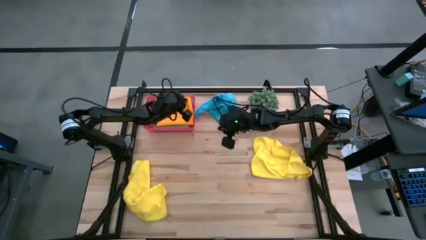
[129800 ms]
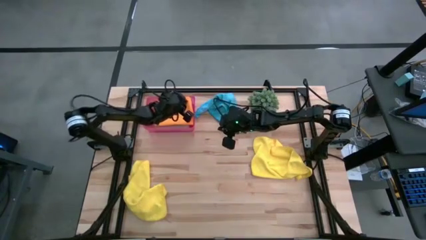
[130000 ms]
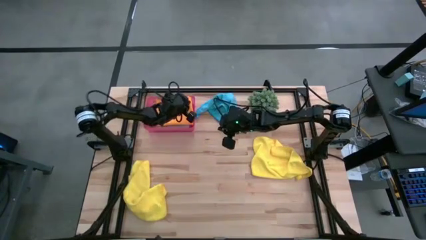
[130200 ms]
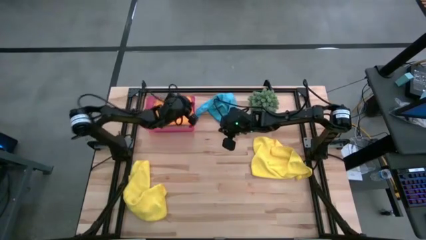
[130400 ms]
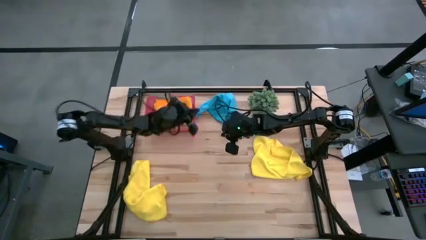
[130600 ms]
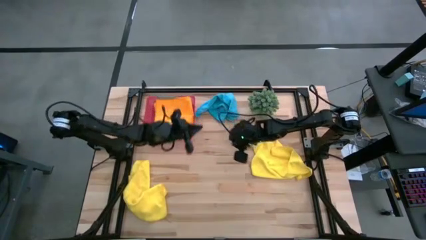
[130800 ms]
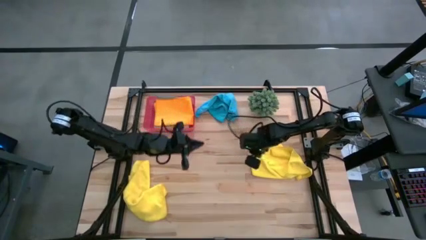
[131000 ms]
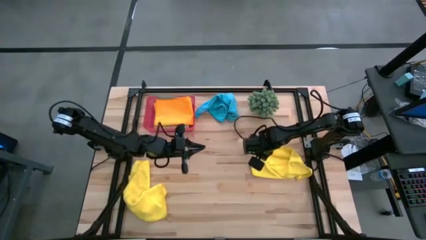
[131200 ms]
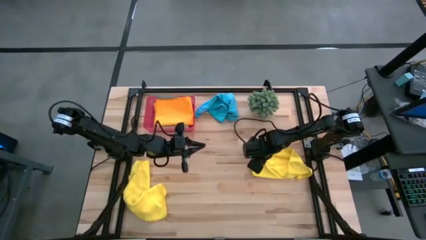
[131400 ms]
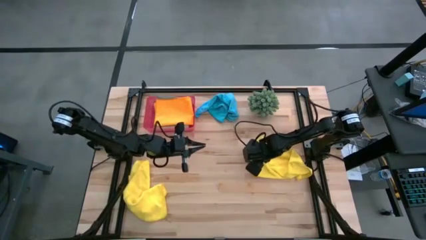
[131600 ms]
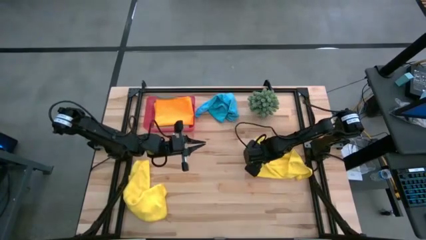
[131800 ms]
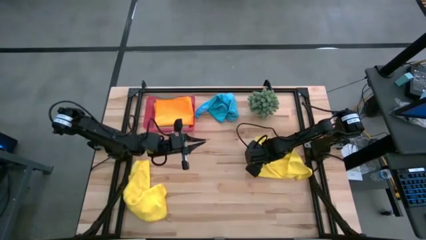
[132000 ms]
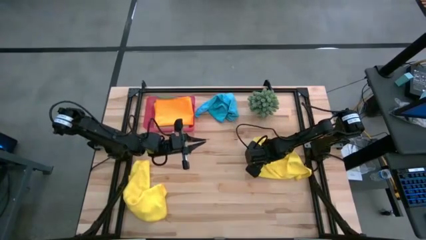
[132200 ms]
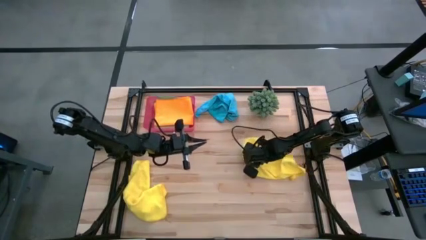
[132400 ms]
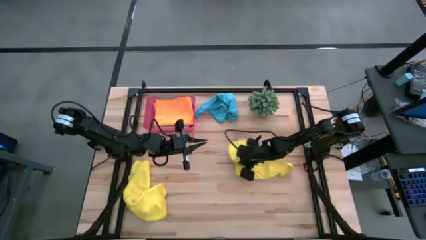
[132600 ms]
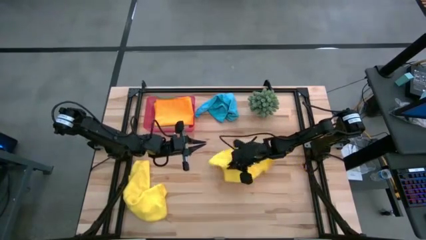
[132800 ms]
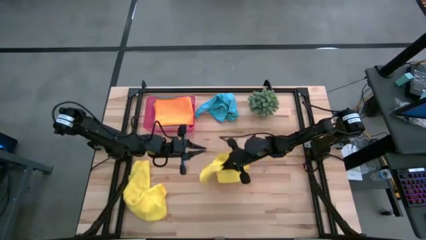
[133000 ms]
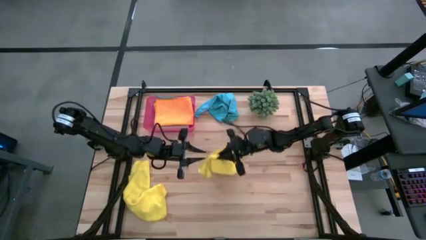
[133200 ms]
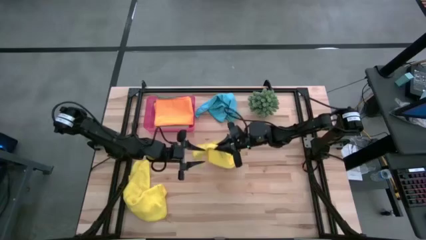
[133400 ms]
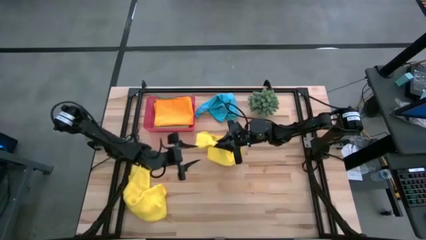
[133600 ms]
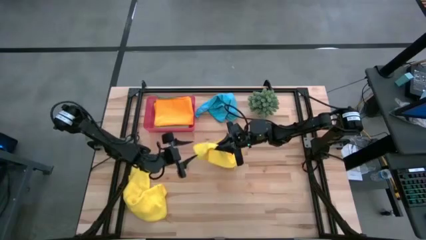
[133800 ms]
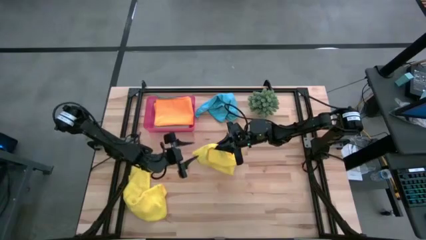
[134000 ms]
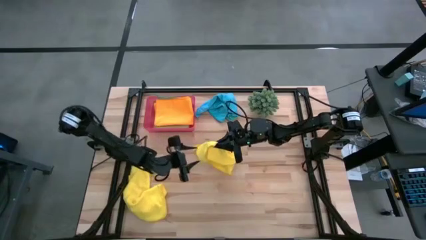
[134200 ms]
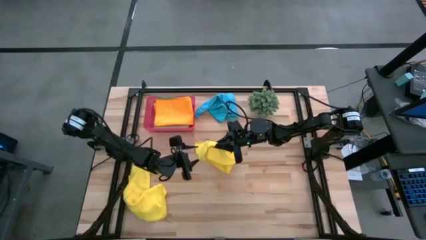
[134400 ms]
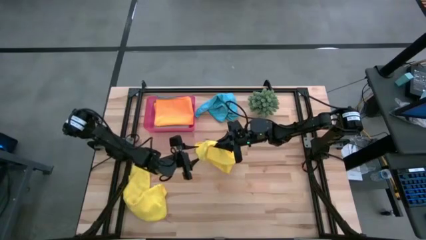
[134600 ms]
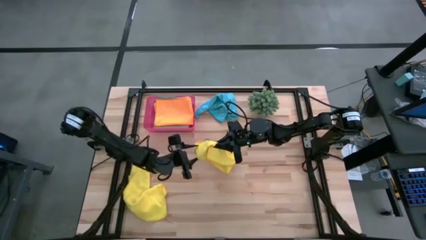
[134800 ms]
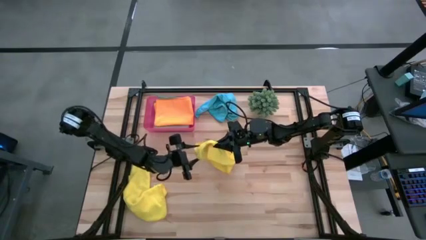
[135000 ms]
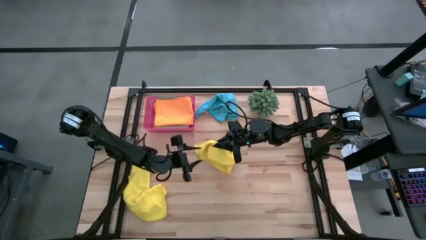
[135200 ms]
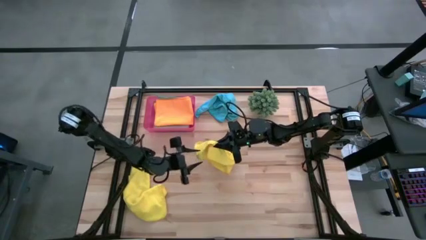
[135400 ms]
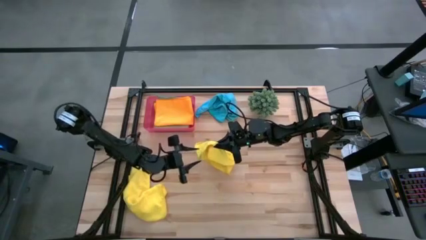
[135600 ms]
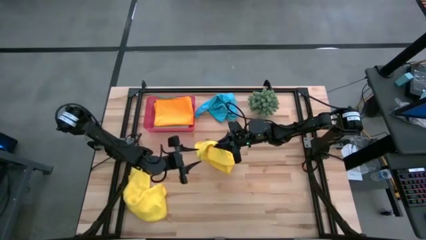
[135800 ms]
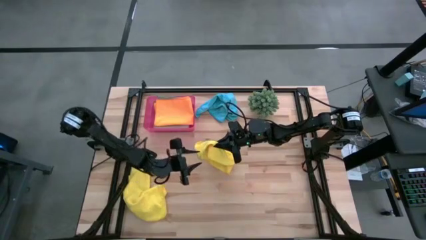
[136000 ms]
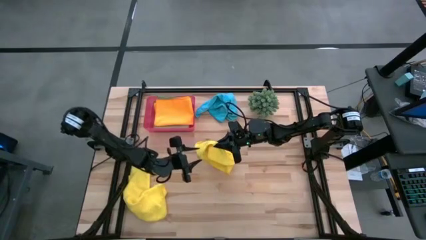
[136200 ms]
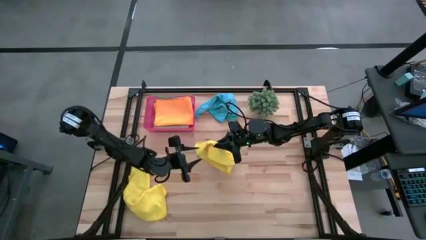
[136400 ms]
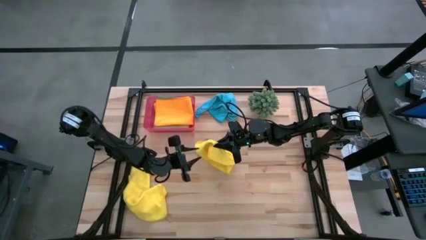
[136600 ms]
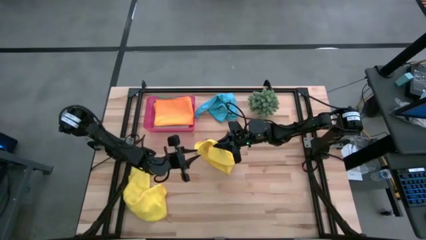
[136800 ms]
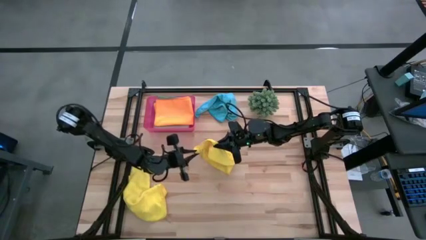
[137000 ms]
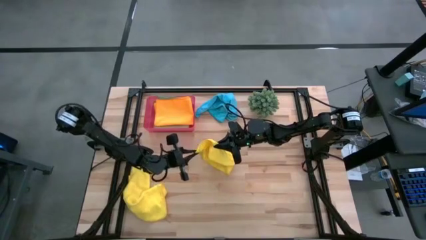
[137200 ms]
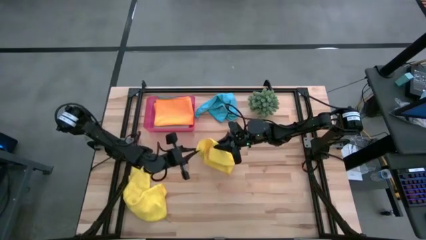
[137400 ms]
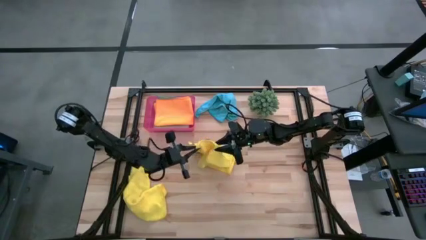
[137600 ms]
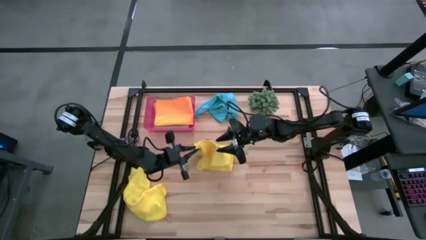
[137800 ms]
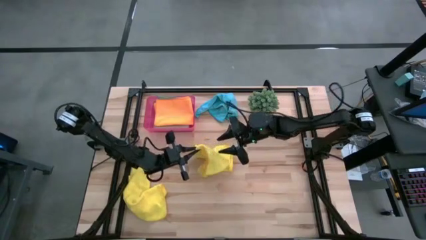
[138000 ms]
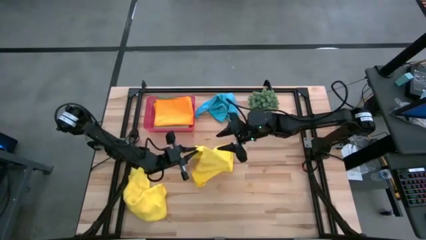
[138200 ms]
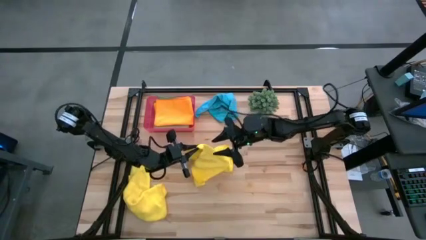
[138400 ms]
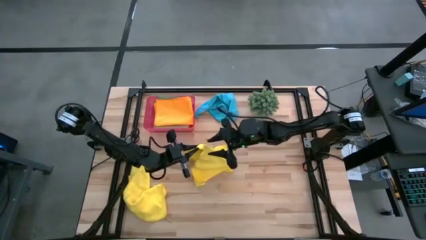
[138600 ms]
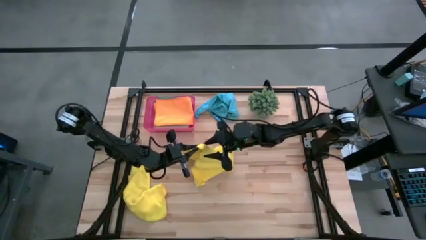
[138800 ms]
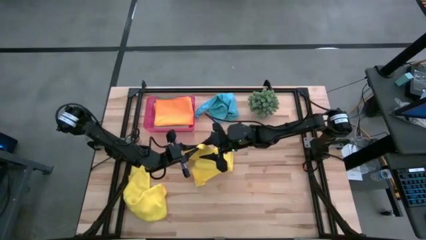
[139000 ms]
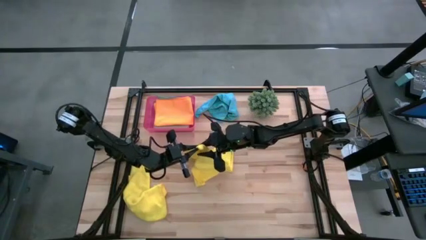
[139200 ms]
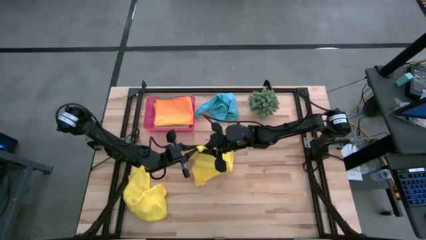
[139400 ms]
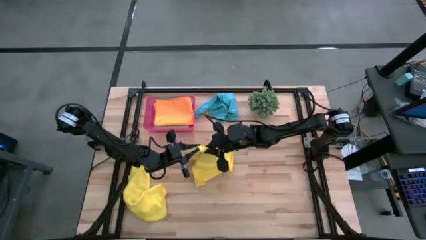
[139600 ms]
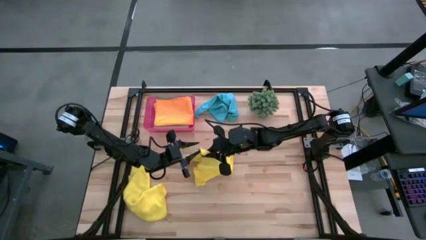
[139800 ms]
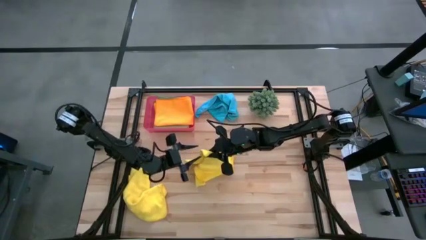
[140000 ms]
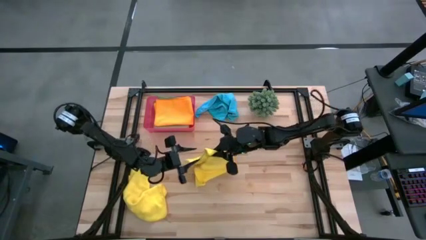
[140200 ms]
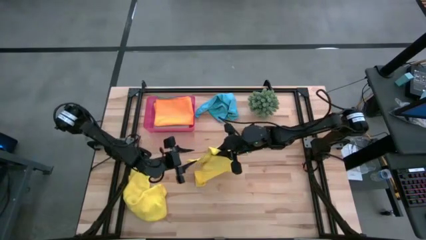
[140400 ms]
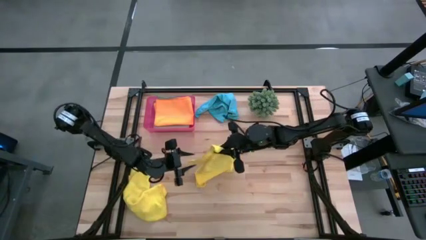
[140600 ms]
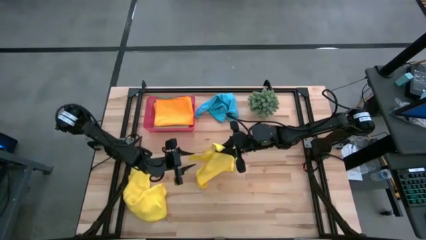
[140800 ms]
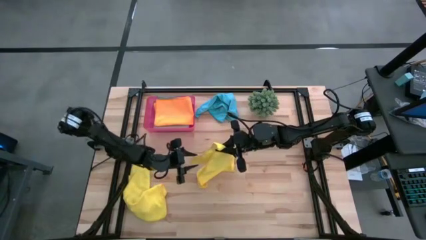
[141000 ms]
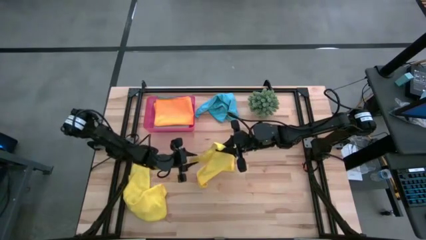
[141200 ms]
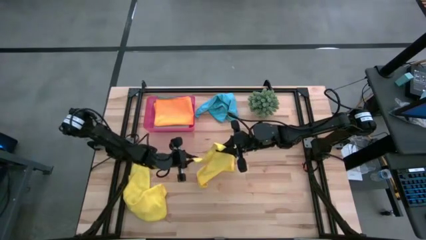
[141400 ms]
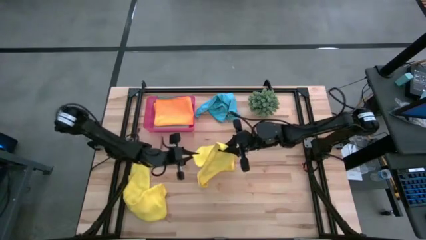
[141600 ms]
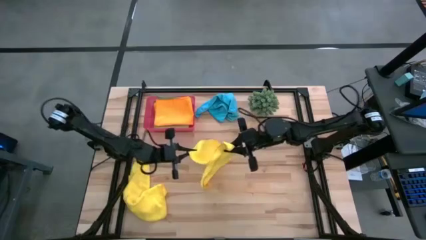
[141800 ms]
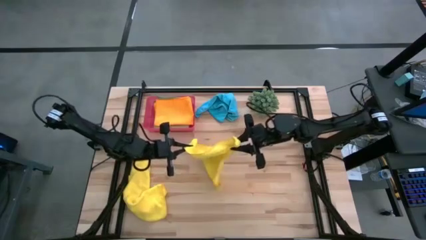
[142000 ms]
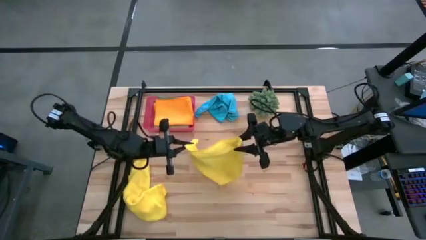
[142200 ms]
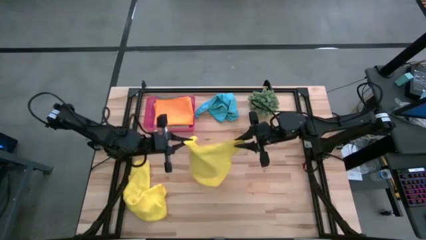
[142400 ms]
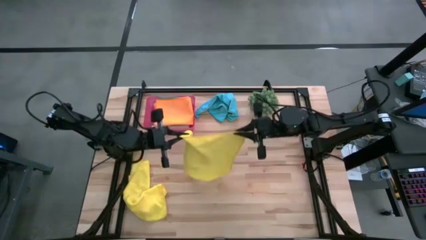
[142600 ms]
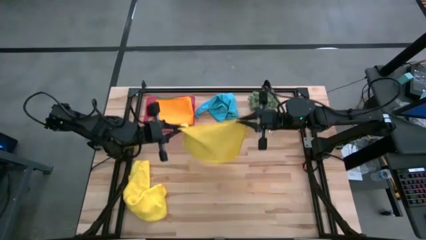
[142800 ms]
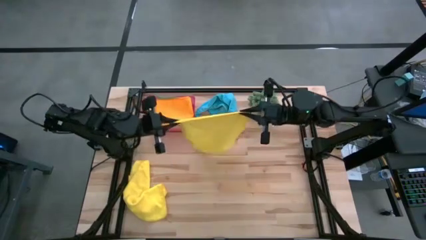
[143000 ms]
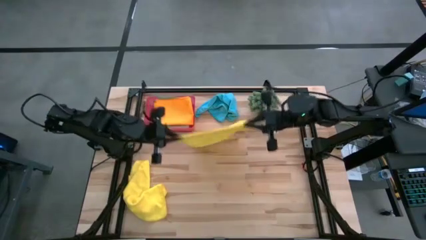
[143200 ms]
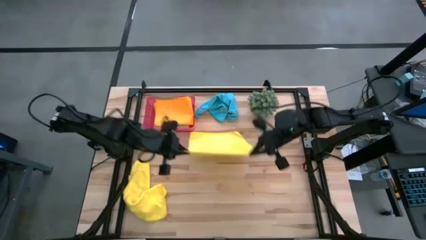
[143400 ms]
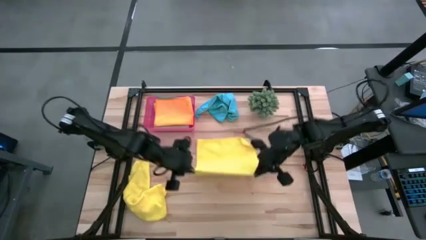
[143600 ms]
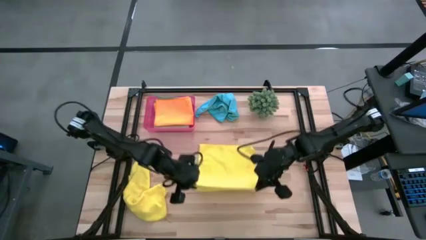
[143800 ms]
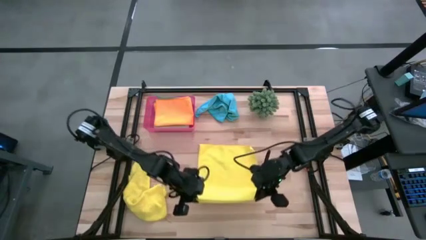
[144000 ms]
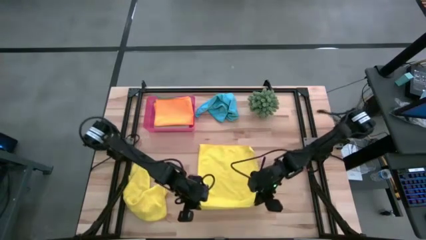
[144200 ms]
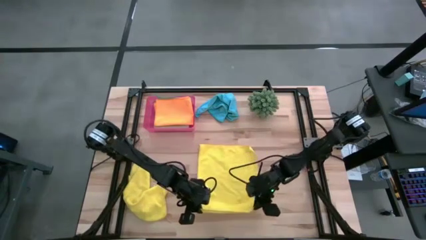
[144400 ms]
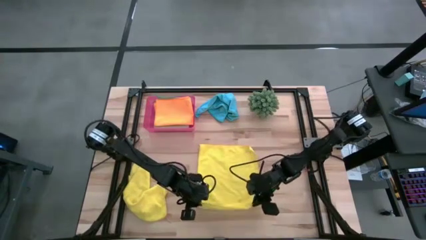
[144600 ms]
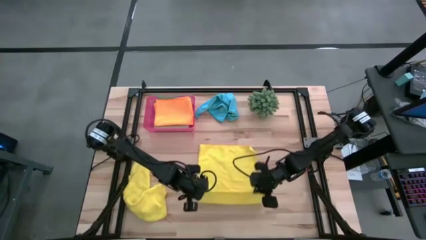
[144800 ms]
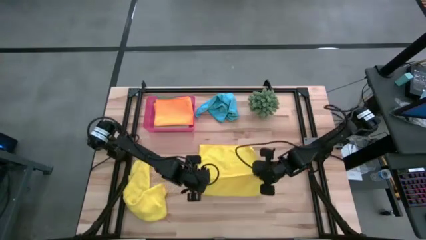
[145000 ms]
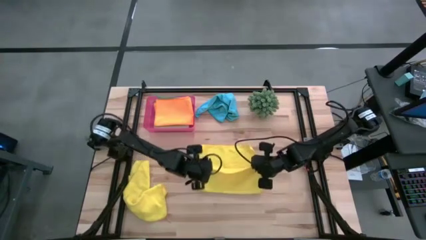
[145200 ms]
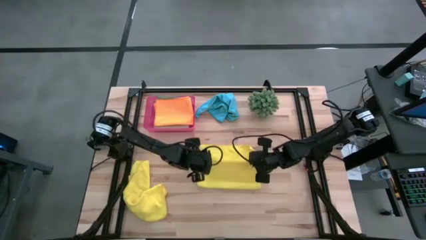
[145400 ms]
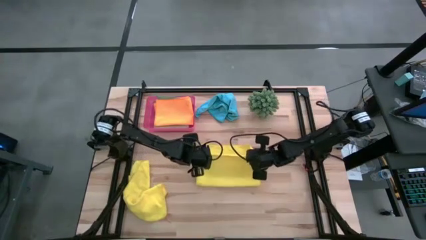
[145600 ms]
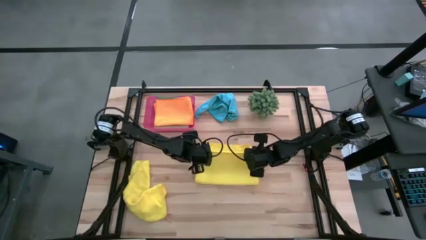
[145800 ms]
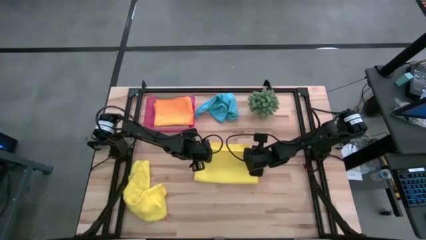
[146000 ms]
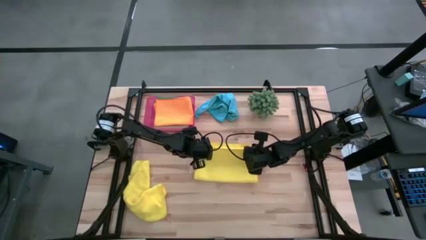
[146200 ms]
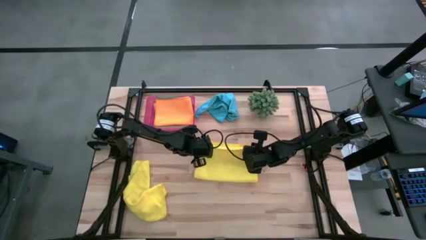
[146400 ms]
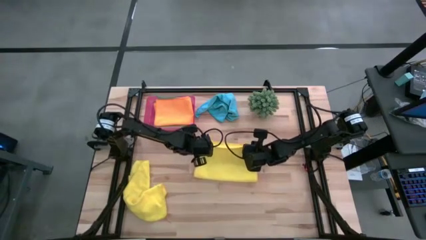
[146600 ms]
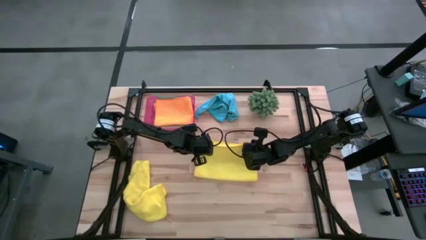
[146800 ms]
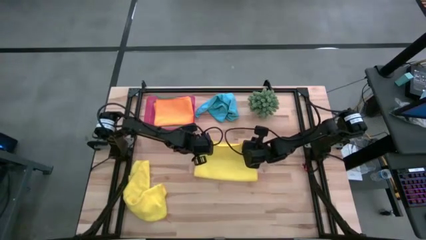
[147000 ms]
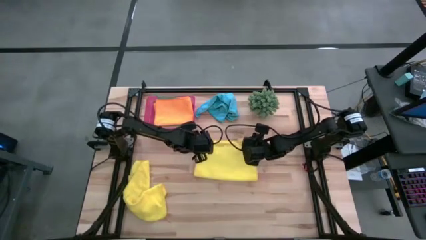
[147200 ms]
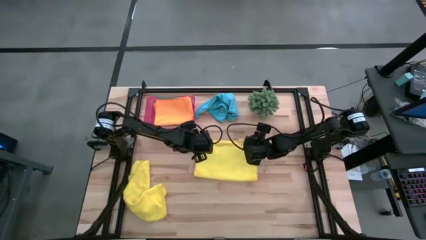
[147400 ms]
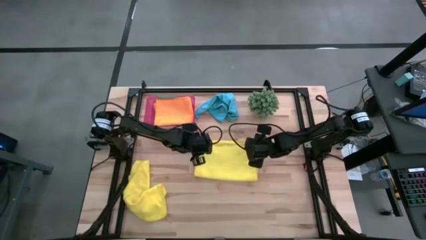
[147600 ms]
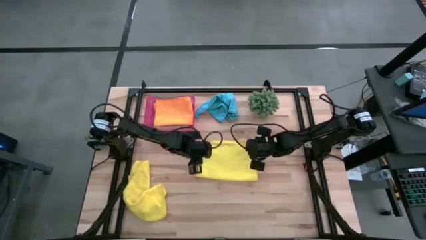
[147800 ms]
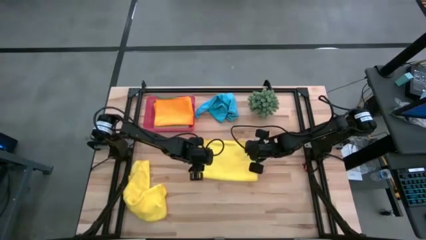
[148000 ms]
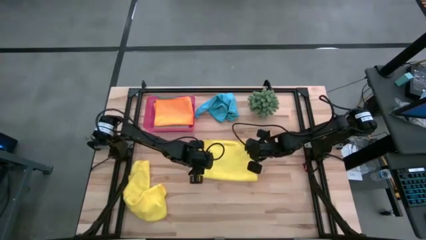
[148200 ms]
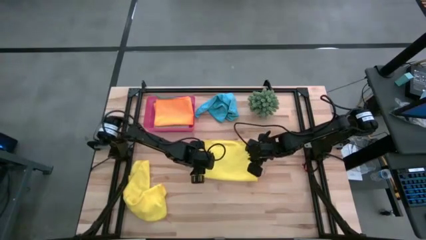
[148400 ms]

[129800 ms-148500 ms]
Task: Fold microfiber towels
Fold the right yellow towel
